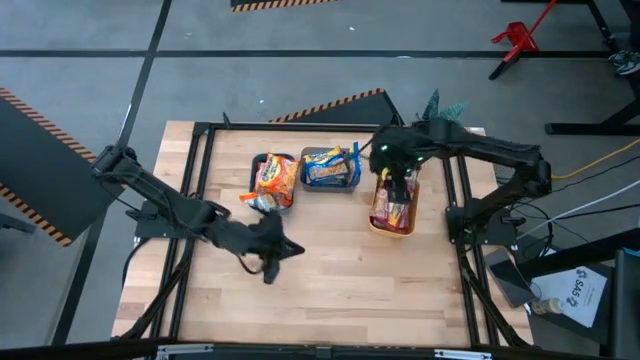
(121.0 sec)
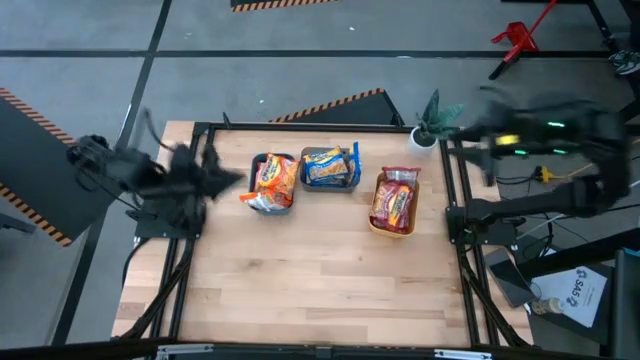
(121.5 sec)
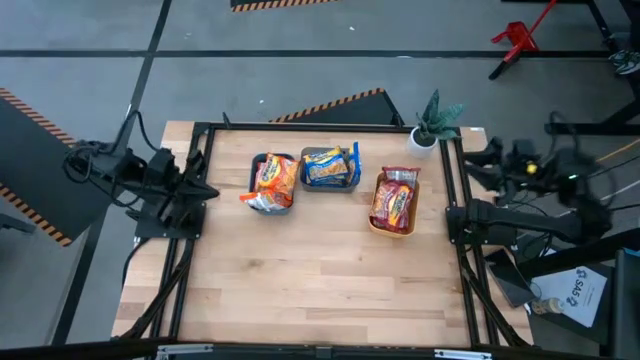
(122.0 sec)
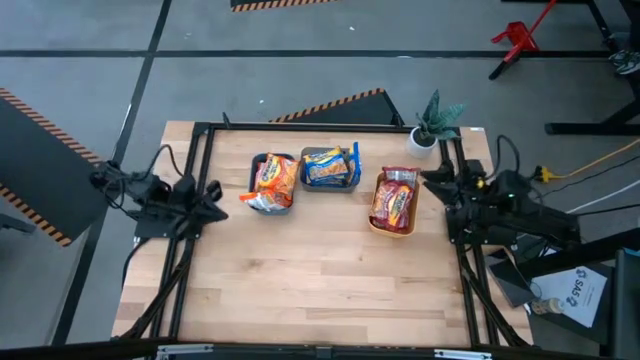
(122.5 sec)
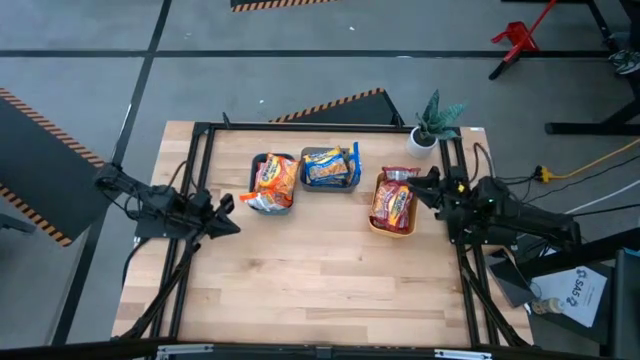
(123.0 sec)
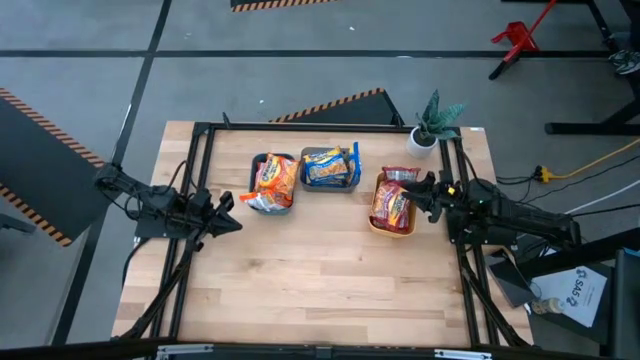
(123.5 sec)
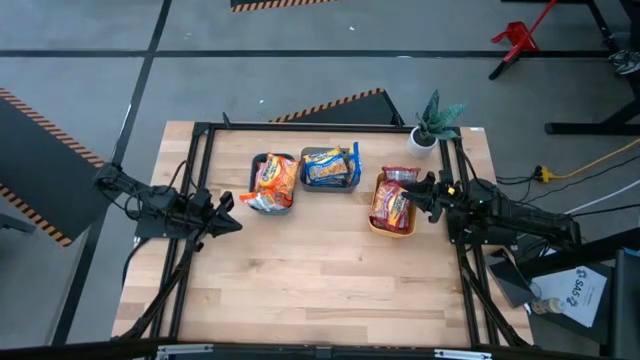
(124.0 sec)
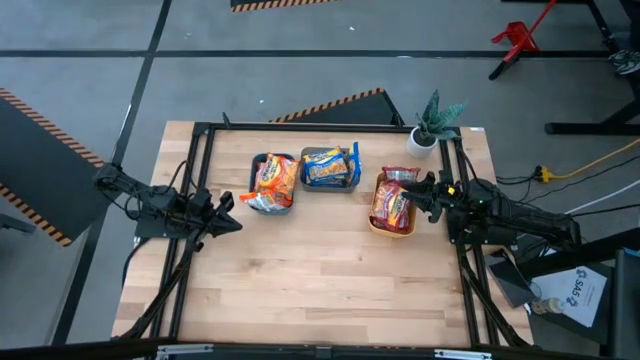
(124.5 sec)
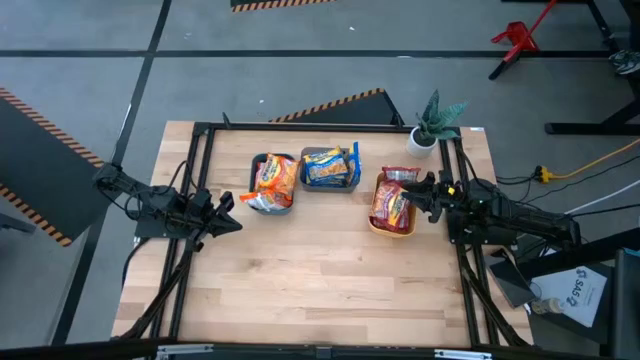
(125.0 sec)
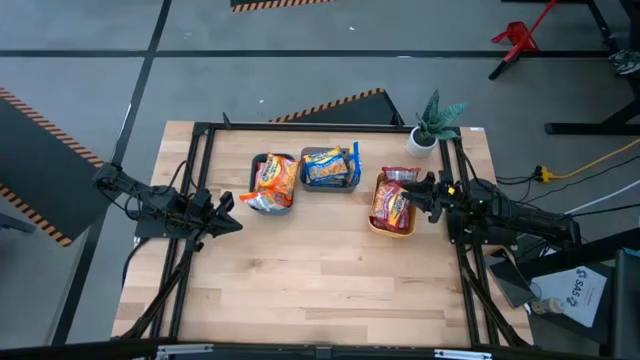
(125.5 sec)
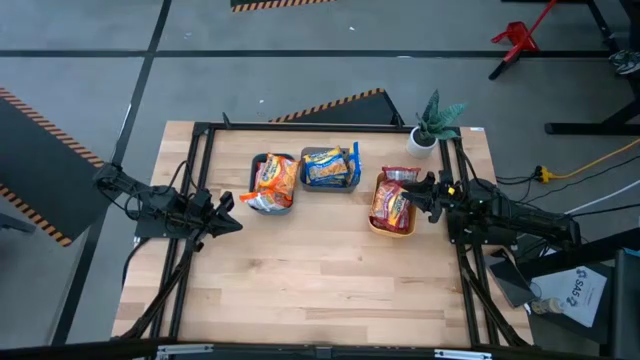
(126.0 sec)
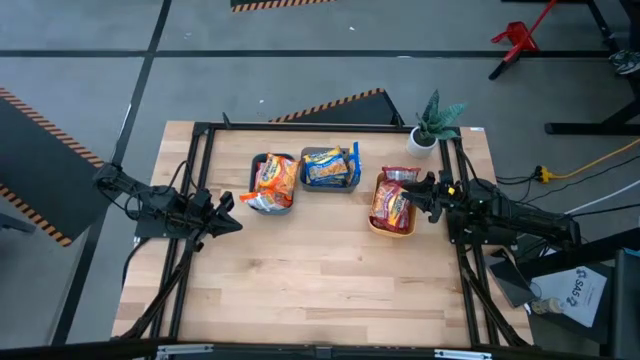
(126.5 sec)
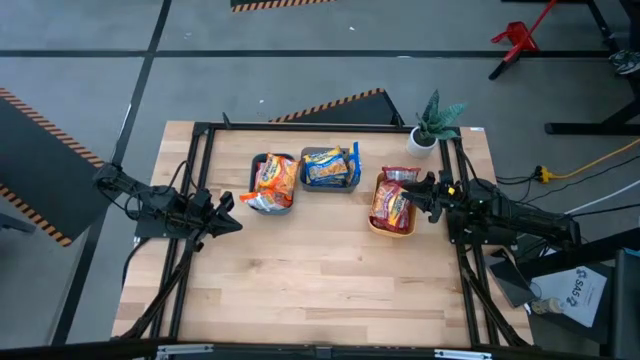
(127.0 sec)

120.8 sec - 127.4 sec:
Task: Sort Maruchan noodles
Return to Home Position

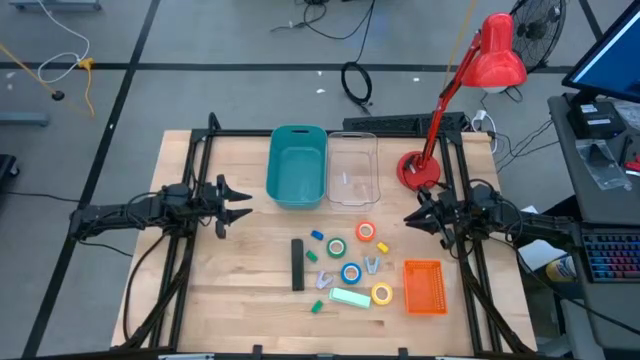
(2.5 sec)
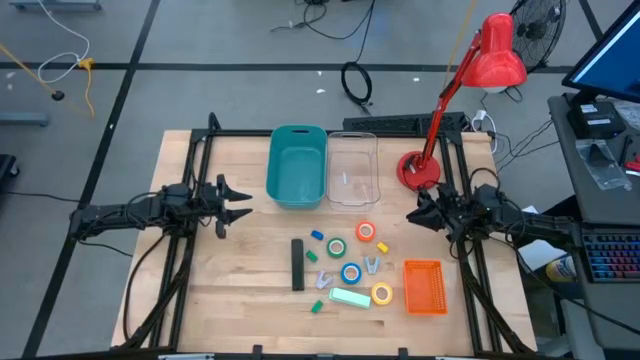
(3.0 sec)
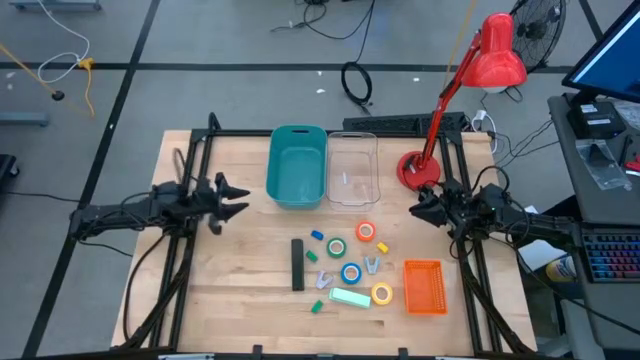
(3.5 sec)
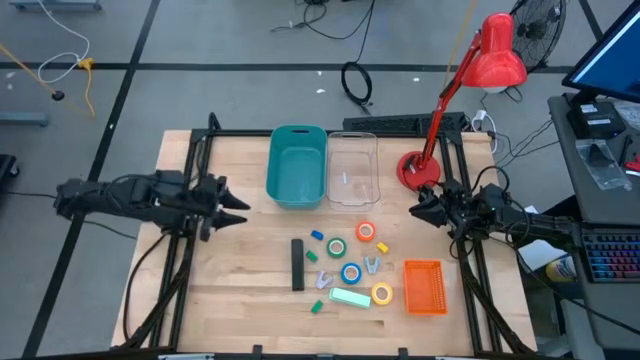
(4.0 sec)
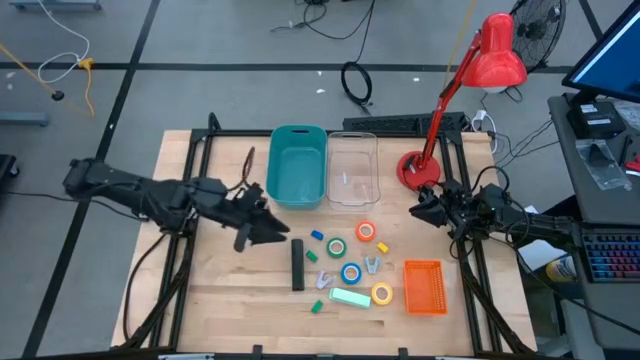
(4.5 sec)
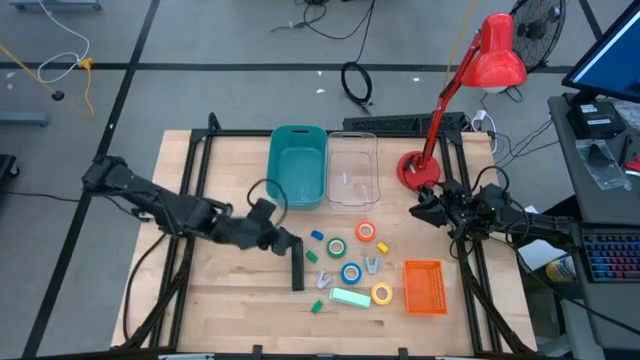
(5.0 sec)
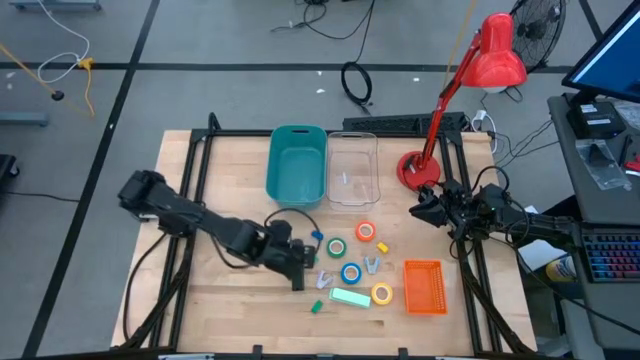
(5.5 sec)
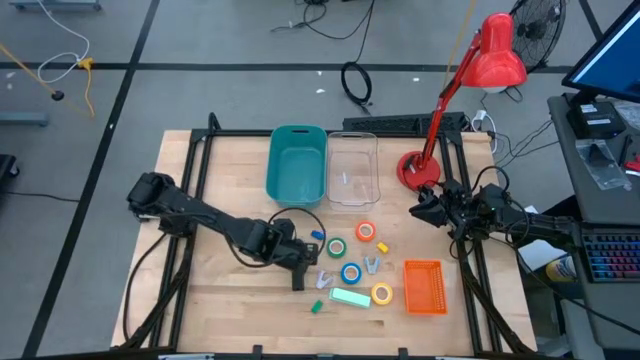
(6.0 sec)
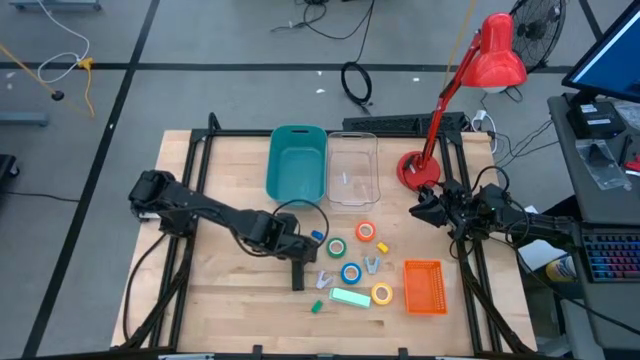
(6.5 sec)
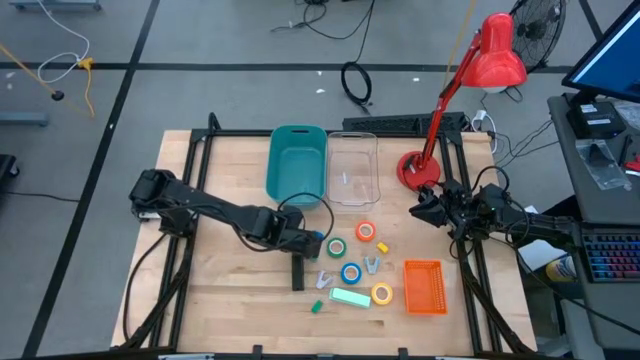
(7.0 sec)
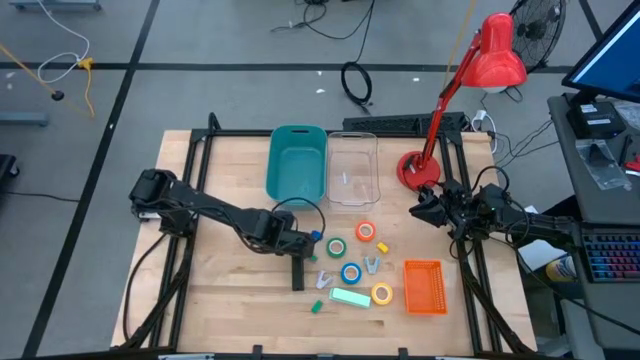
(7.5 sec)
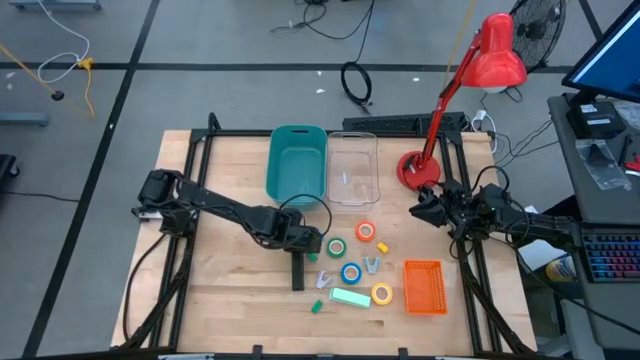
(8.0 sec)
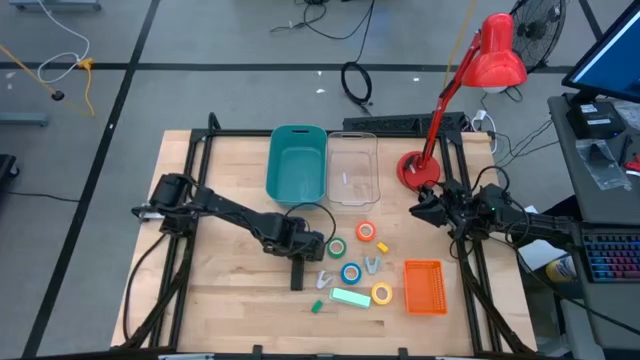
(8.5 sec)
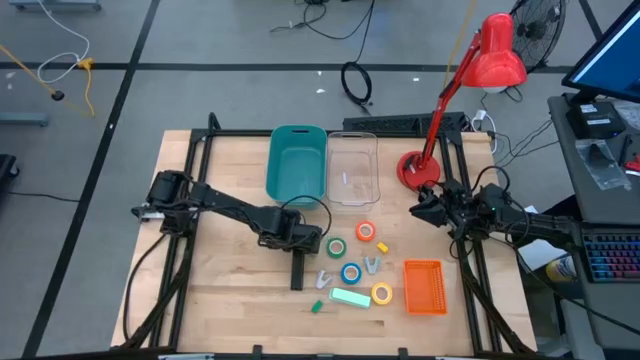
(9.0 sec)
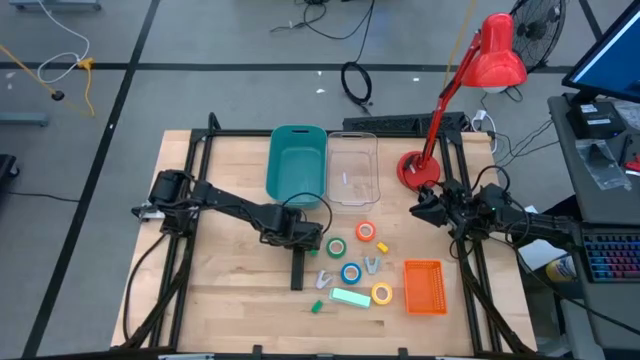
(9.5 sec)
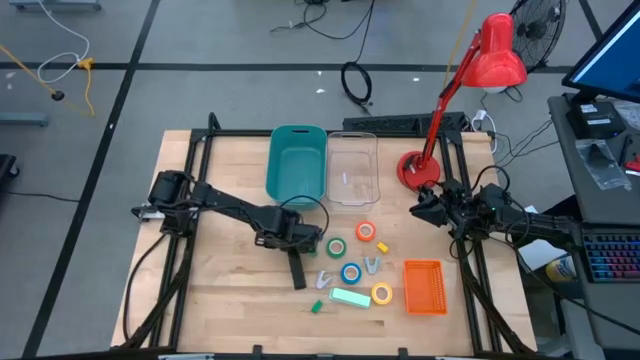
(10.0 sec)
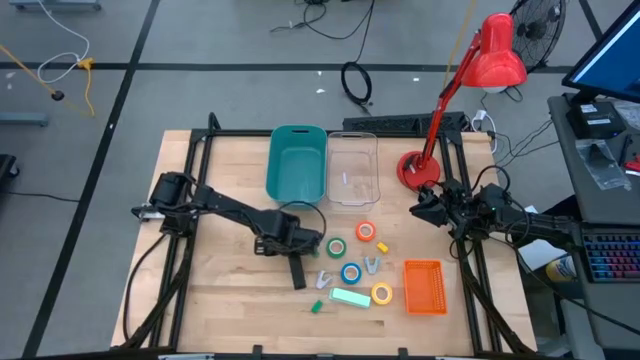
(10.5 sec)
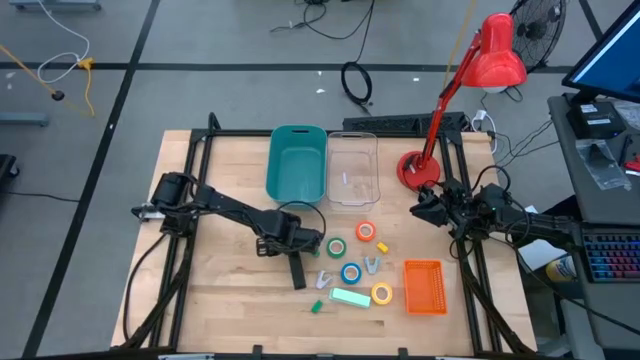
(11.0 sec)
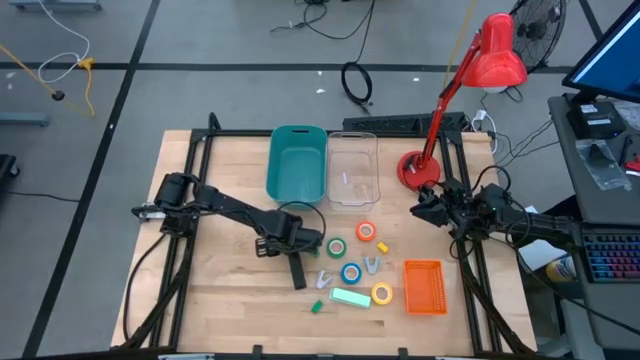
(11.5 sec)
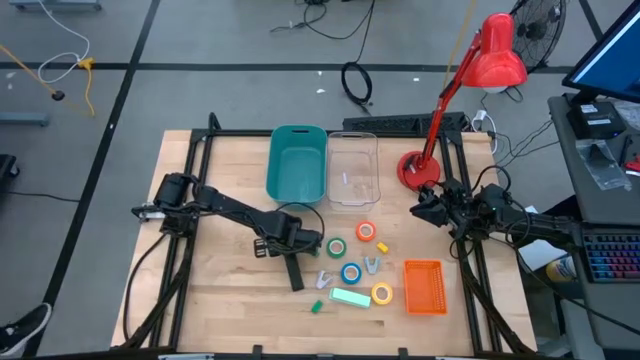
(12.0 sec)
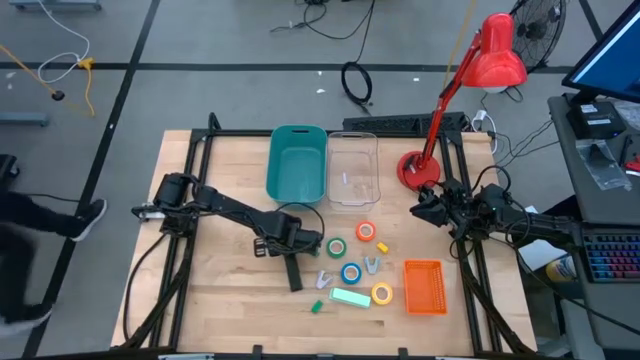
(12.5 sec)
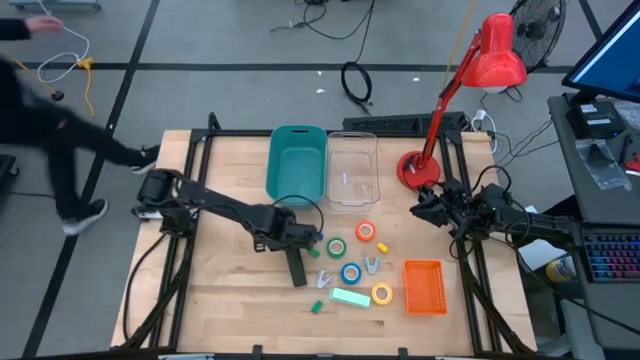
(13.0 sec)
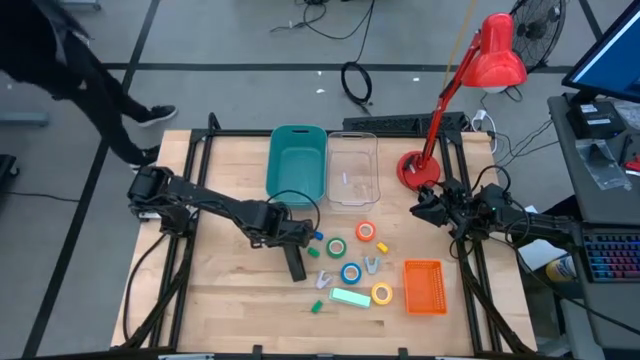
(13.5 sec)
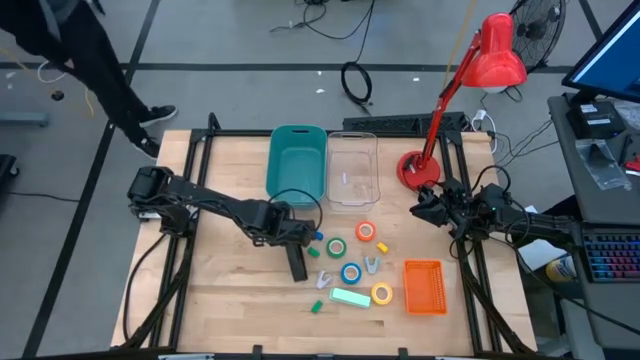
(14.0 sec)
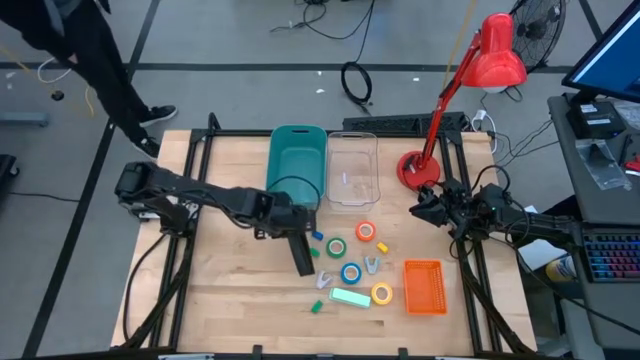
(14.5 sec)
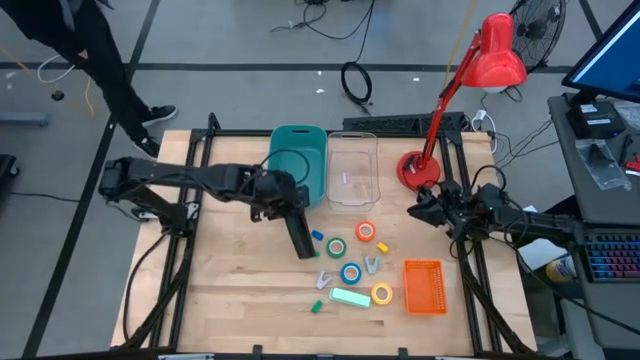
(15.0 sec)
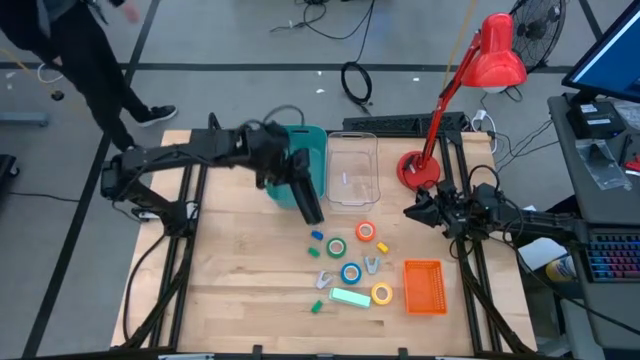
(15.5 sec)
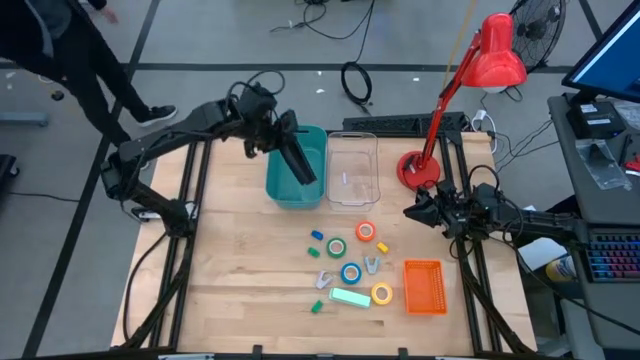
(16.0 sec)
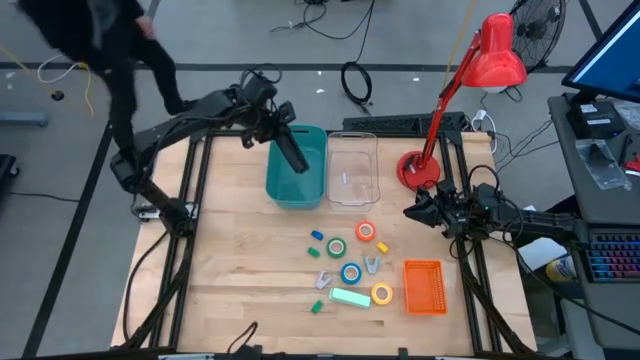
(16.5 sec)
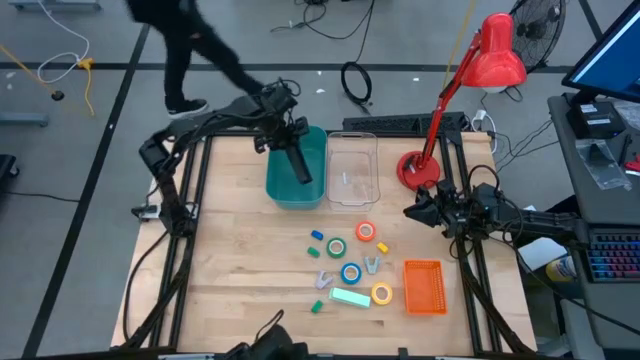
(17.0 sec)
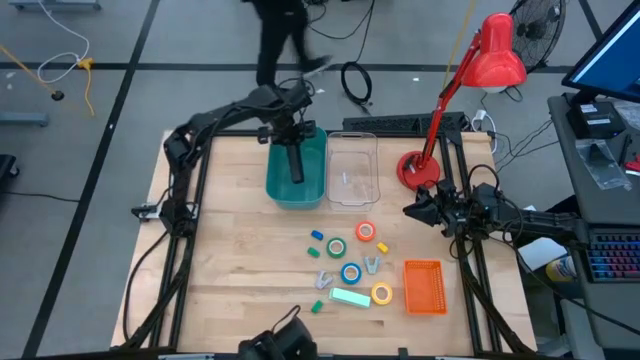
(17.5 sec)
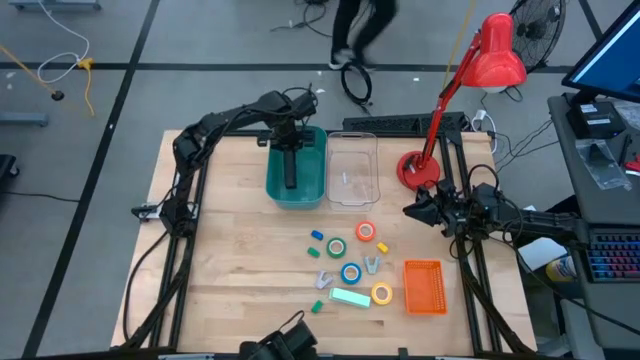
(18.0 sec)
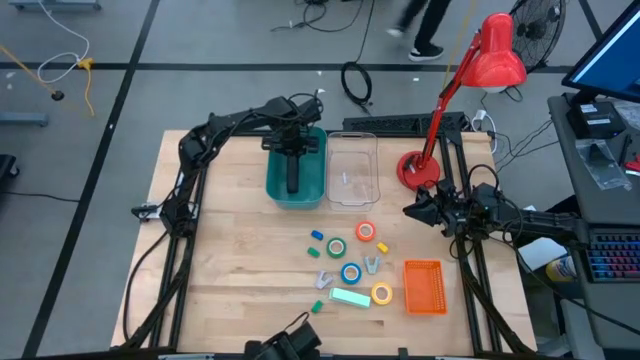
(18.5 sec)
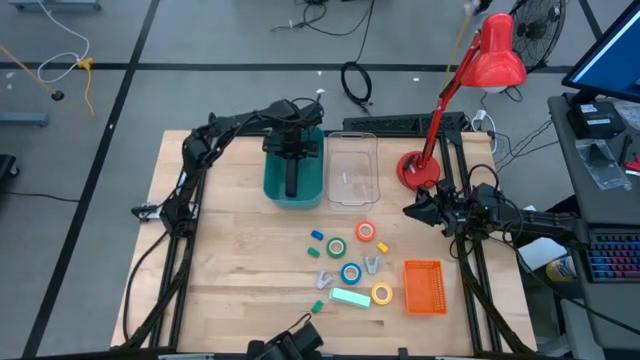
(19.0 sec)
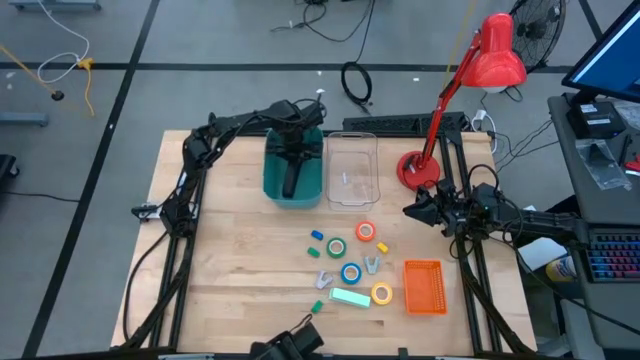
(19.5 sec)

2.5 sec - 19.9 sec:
Task: Pick and place Stapler, Stapler remover, tape
Put the large black stapler into the green bin
